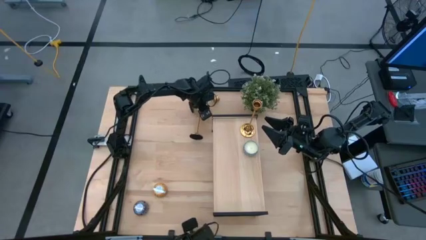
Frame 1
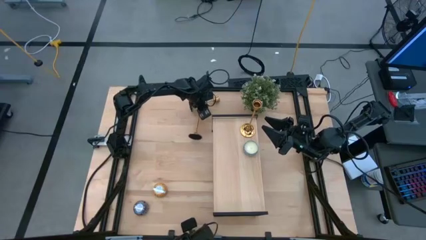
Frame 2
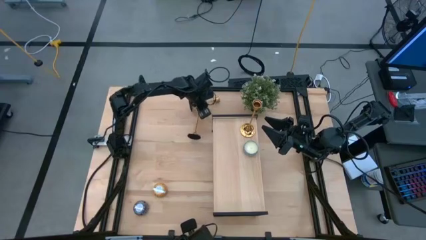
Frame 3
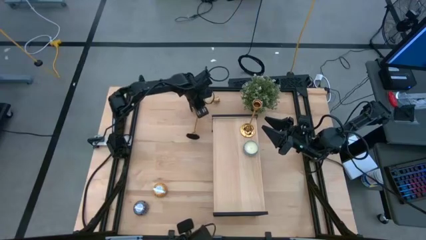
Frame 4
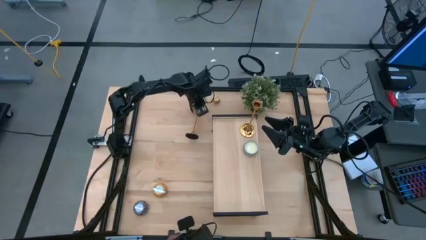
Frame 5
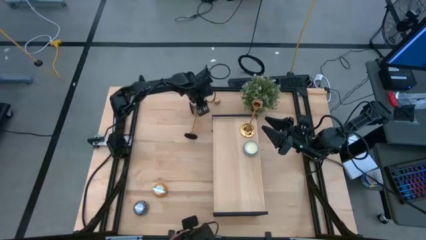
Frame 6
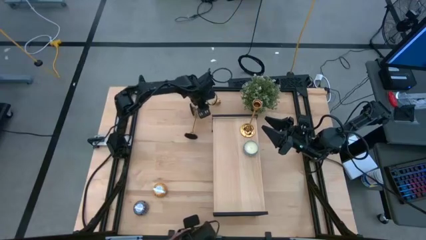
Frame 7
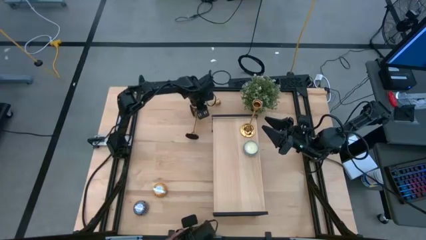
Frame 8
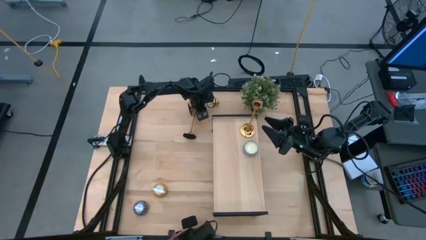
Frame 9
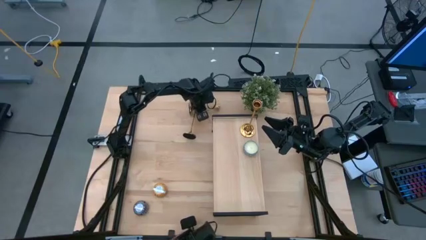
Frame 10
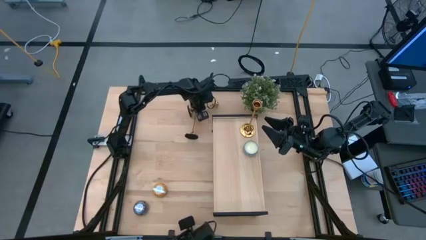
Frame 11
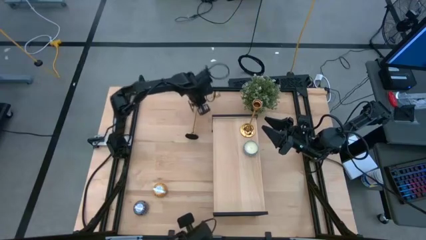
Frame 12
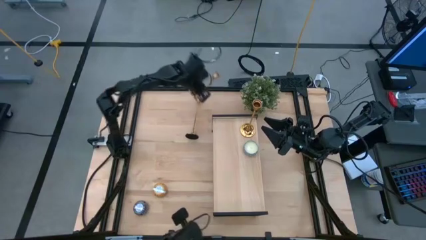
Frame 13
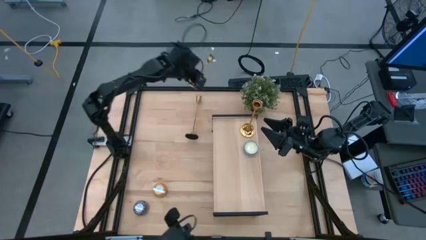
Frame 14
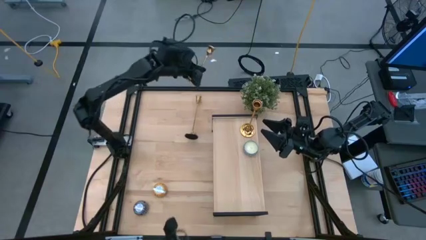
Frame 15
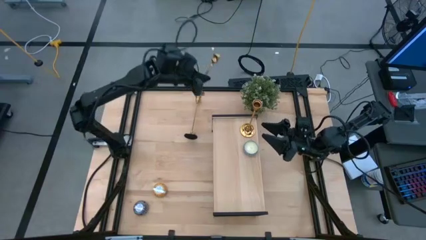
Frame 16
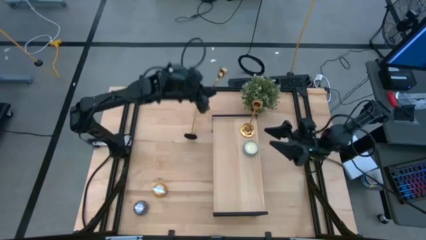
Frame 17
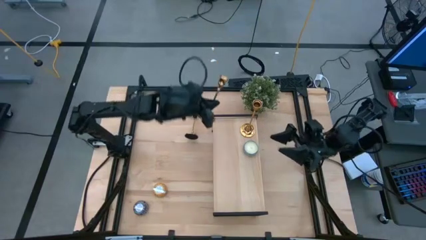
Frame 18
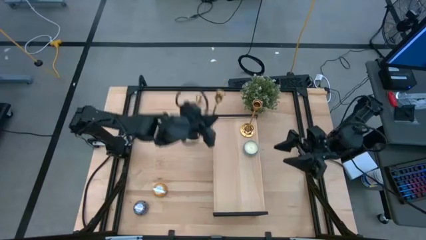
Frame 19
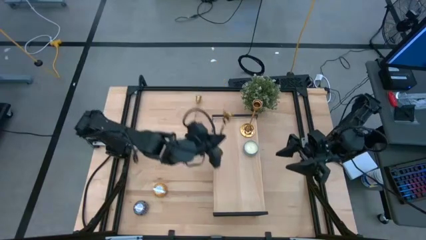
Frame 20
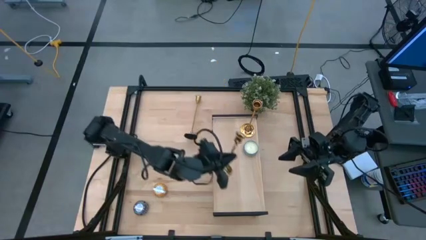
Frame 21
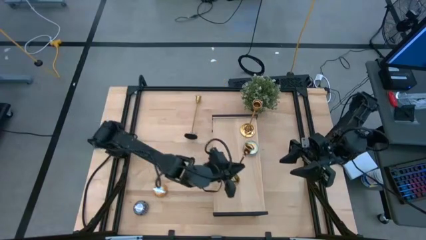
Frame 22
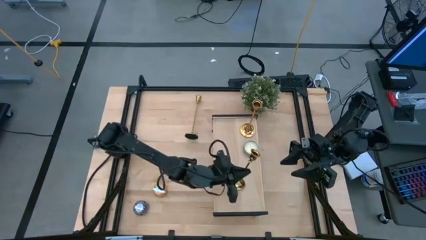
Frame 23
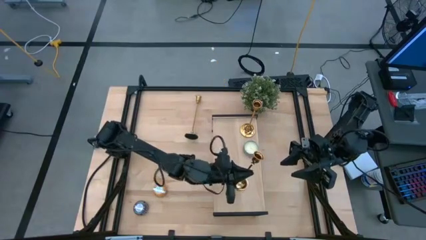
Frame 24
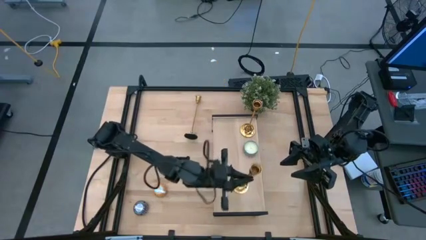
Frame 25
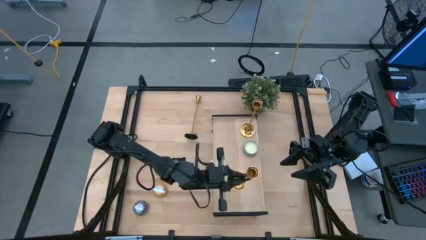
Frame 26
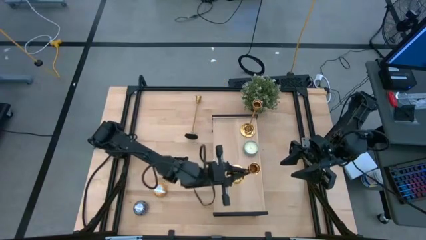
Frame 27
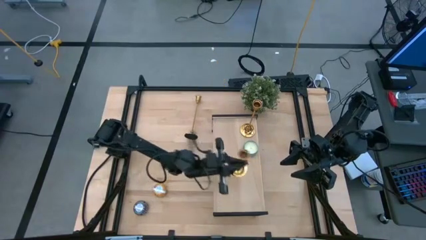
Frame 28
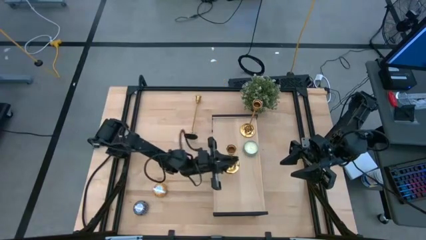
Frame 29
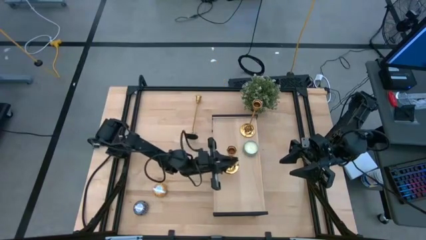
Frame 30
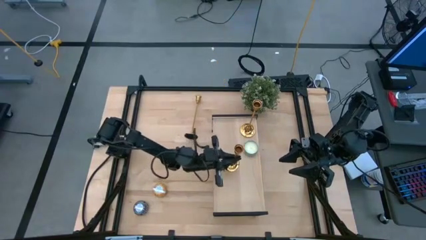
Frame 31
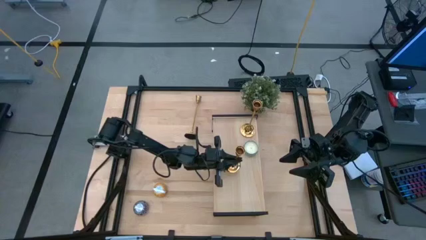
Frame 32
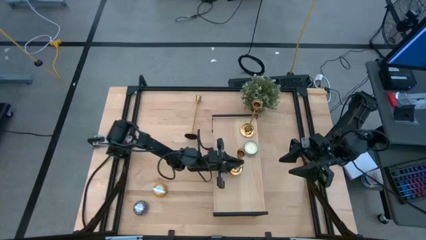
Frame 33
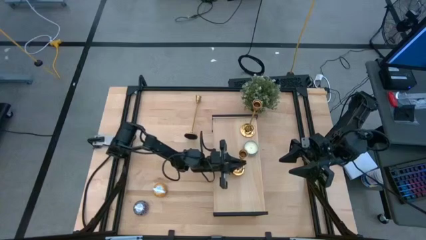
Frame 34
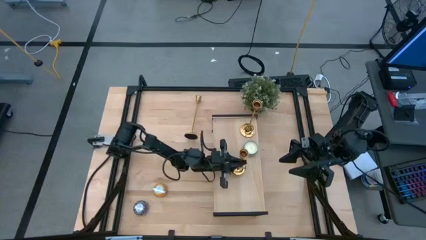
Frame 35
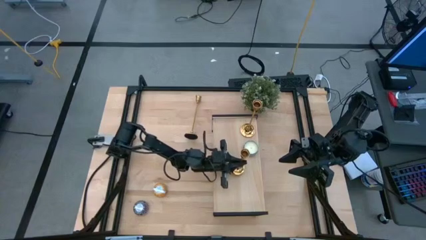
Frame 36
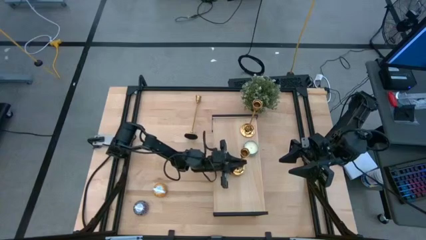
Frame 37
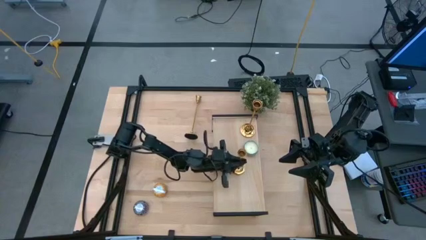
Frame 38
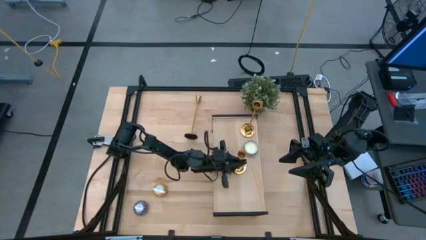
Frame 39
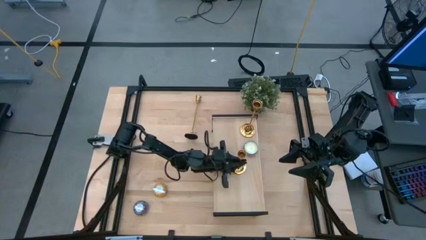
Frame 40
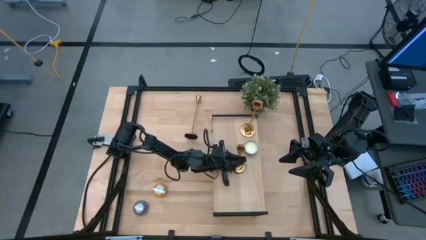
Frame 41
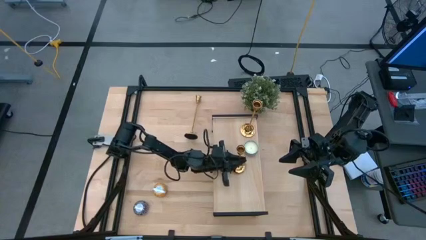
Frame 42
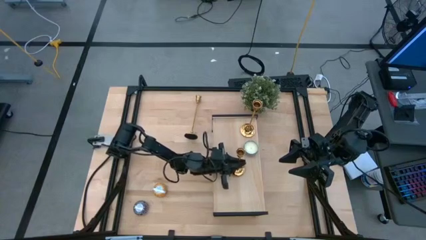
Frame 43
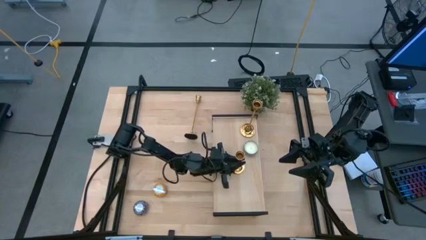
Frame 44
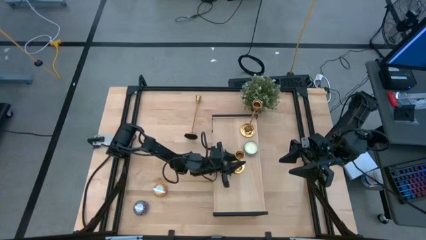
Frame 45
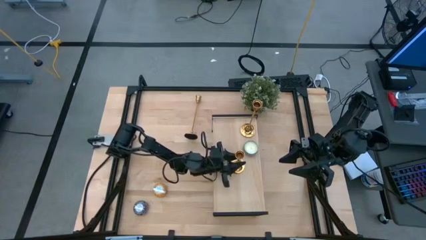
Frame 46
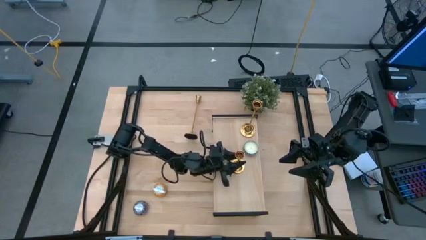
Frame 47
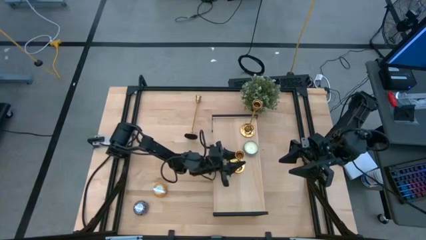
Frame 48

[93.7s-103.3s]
Task: Pick & Place candle stick holders
Put the right gold candle holder on the shelf

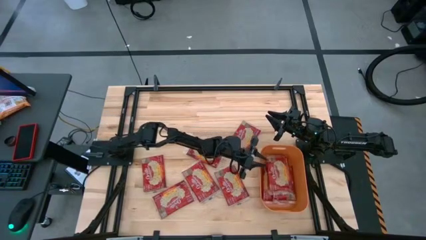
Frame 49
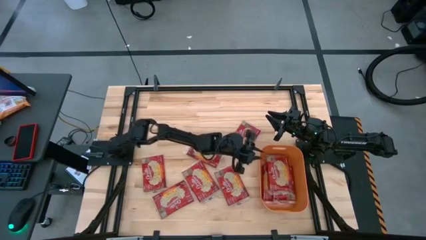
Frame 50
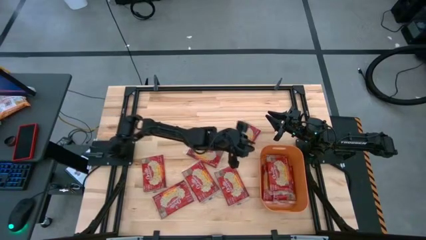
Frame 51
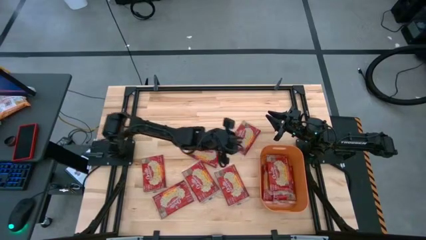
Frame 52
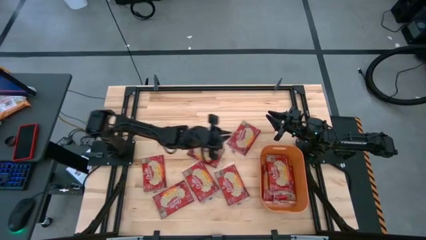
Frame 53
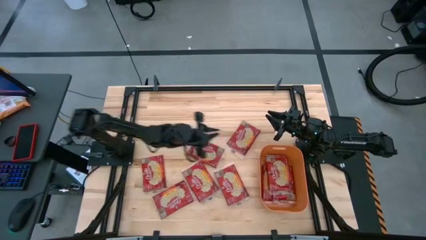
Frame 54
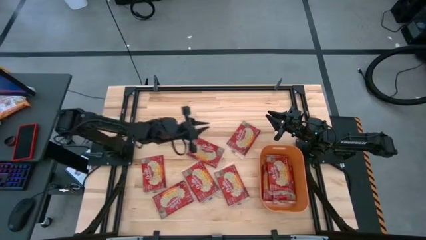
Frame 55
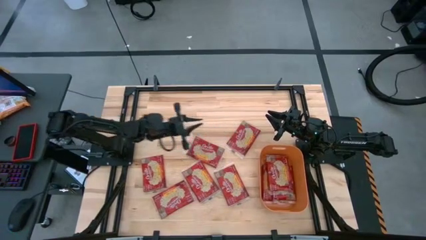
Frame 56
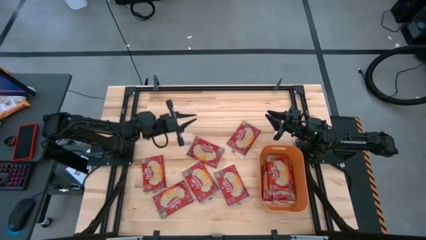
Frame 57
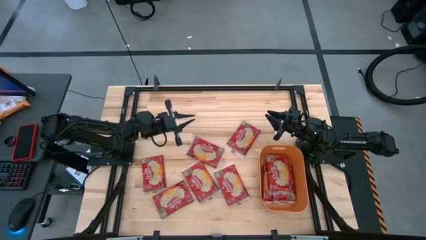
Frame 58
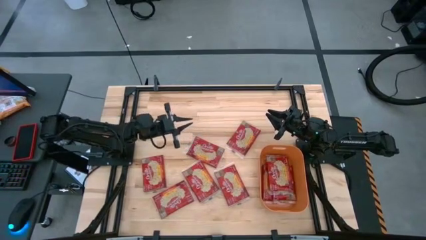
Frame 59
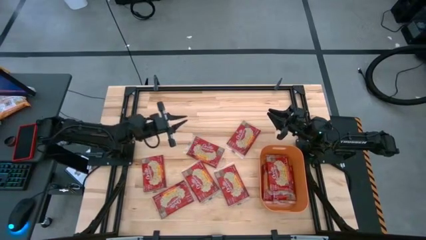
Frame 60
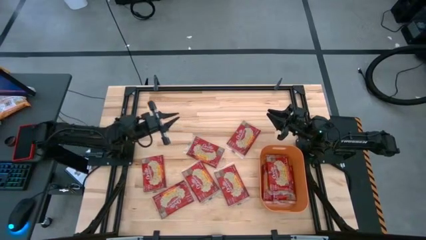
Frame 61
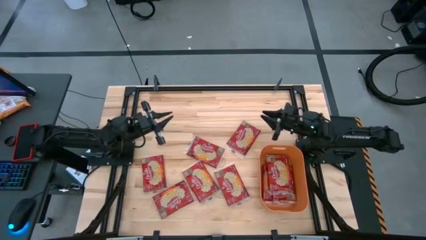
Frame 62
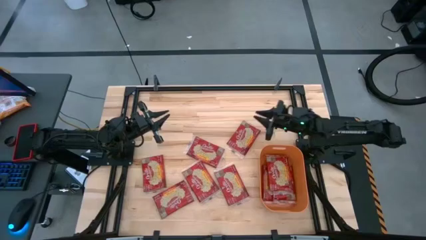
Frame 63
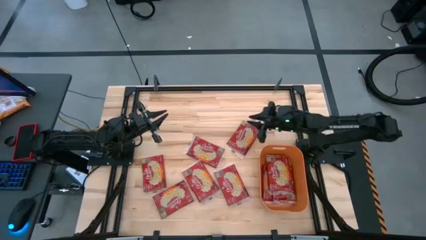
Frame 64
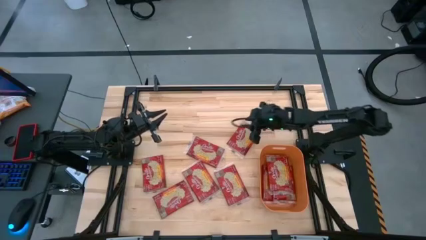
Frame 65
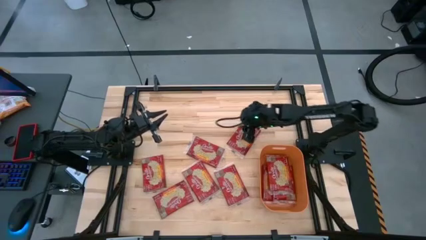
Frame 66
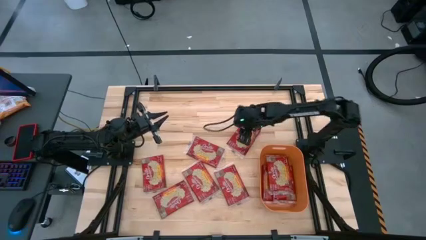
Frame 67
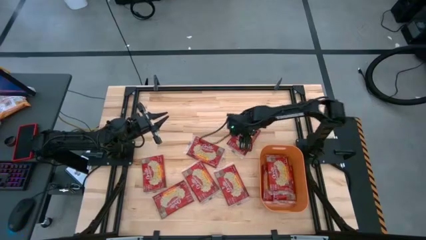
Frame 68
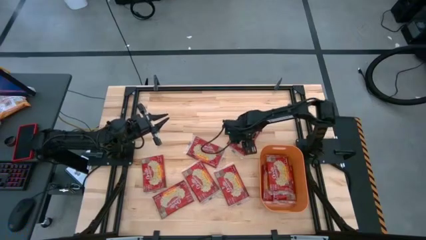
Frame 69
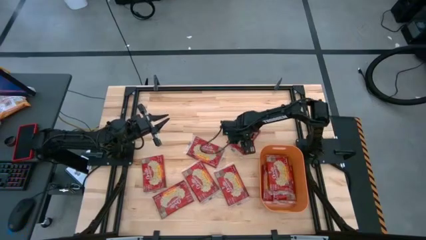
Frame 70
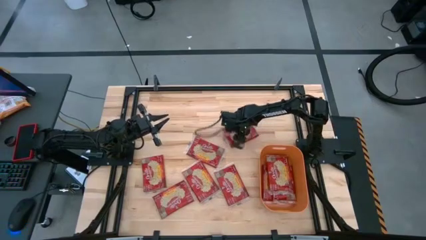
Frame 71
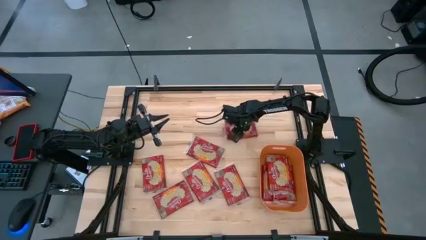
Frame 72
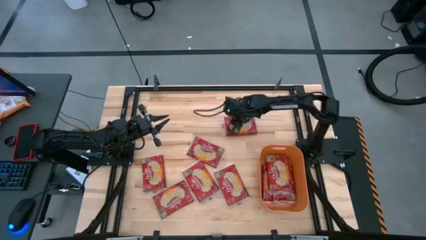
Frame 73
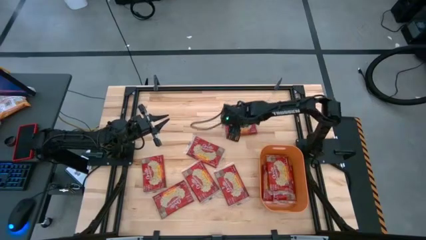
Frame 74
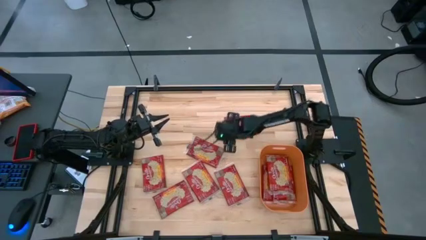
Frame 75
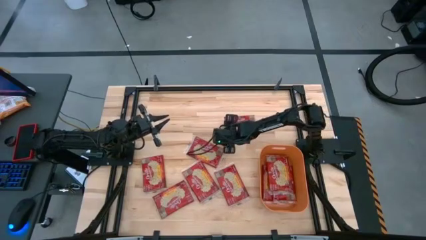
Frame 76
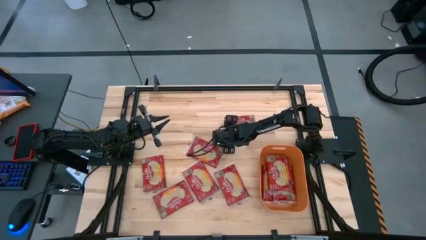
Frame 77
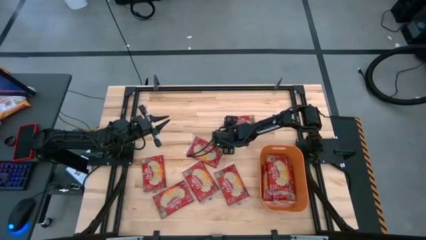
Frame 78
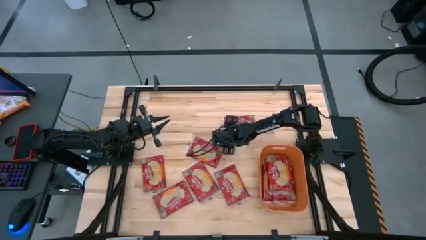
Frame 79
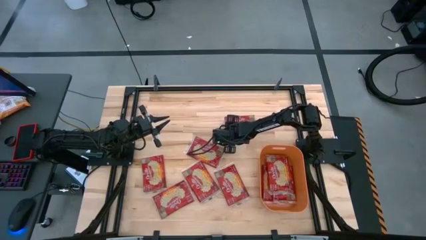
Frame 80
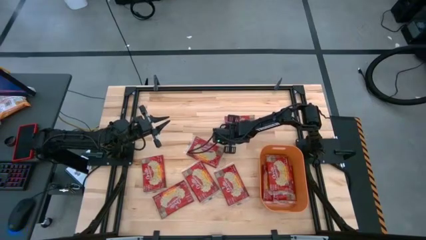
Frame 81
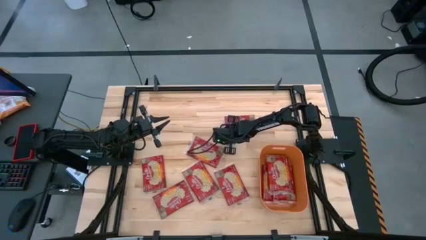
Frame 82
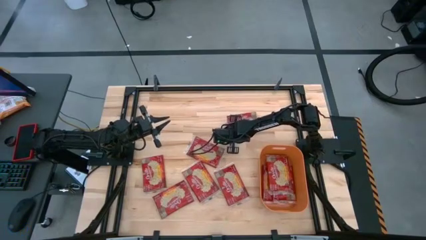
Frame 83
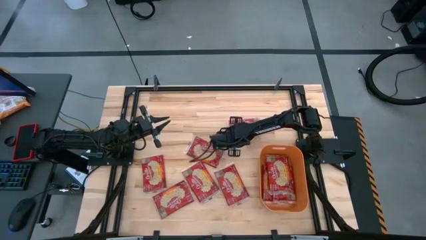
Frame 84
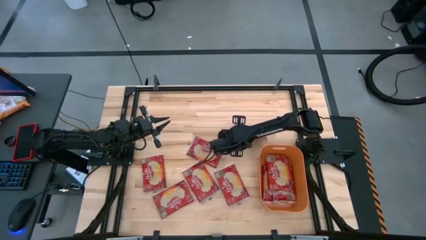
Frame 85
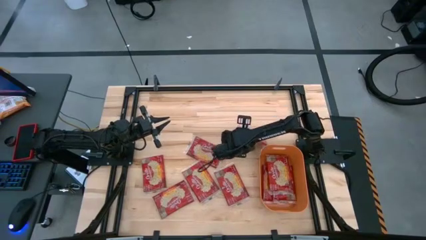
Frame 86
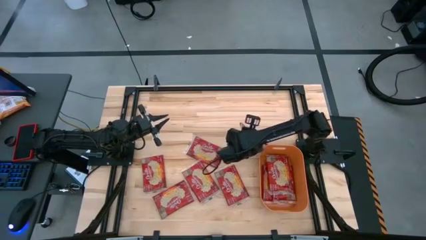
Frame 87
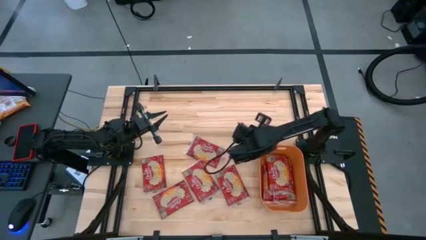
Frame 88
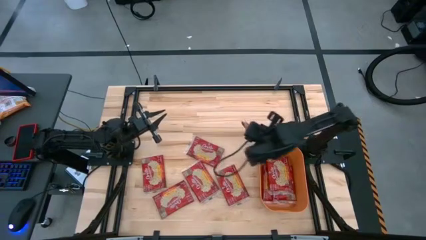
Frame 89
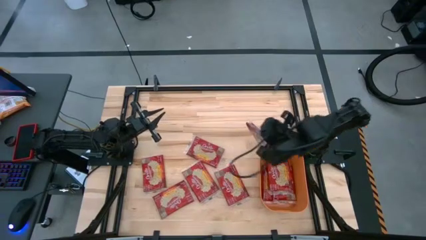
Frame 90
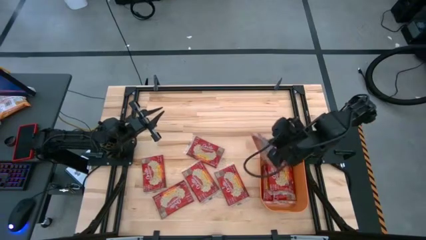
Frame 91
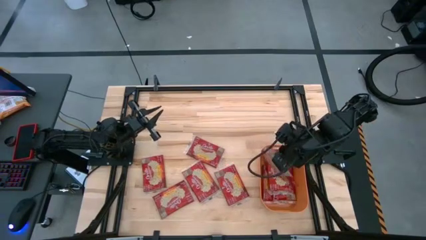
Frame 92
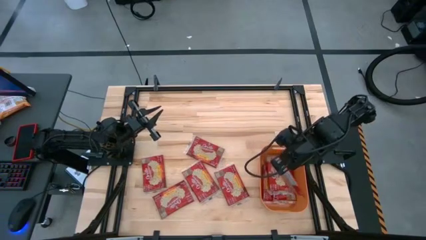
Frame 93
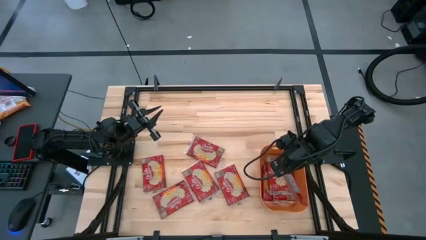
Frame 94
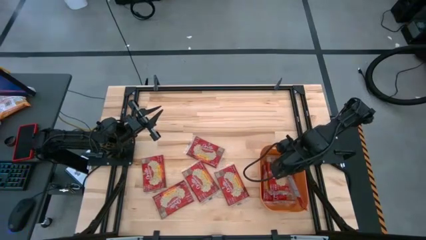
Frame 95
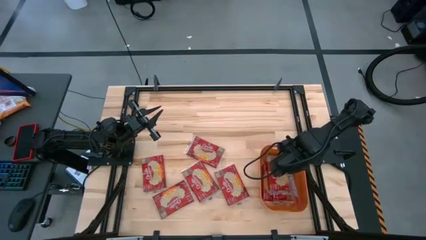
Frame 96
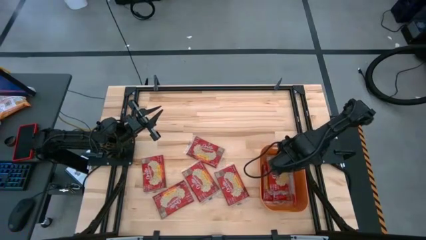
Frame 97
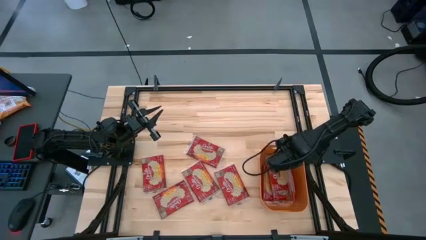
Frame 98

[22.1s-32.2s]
Task: Sort popcorn bags into baskets
Put the red popcorn bag into the orange bin
